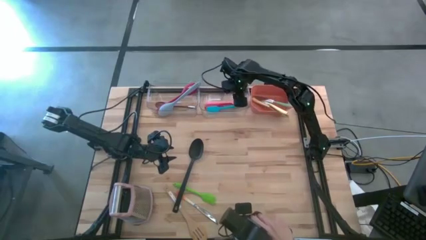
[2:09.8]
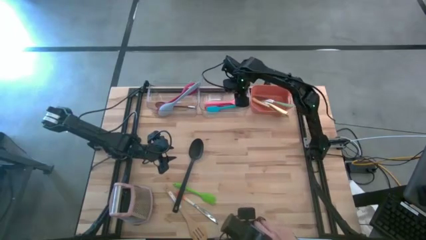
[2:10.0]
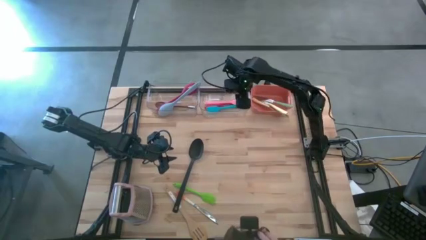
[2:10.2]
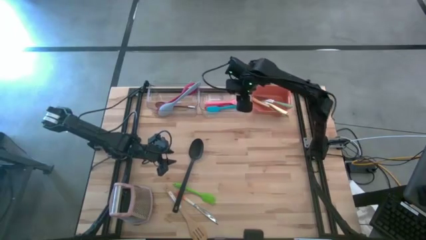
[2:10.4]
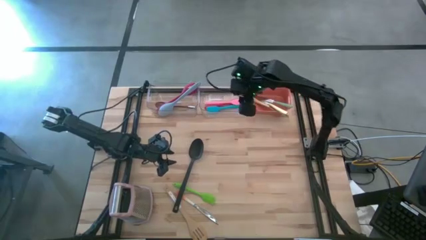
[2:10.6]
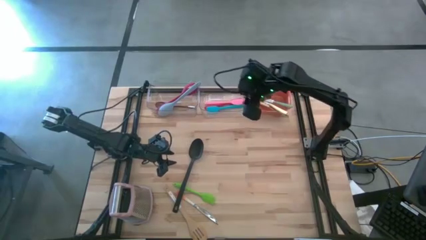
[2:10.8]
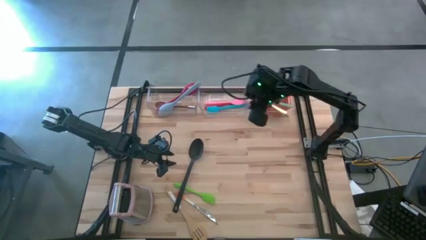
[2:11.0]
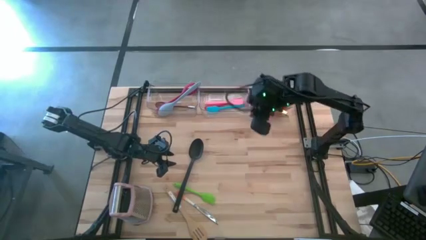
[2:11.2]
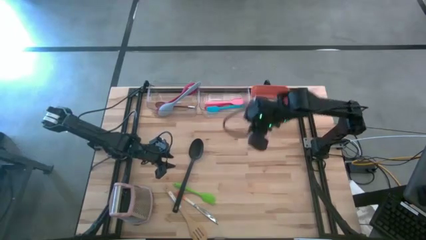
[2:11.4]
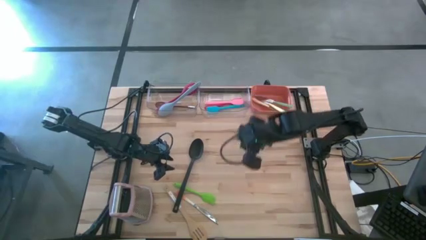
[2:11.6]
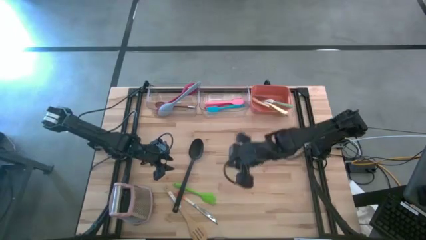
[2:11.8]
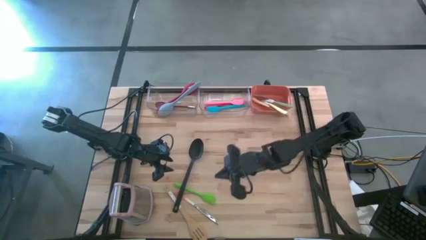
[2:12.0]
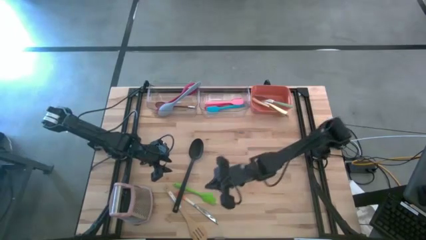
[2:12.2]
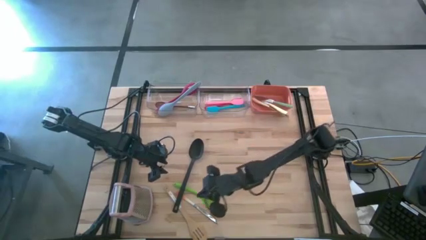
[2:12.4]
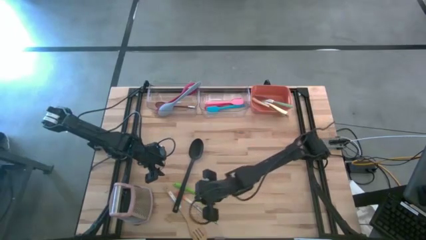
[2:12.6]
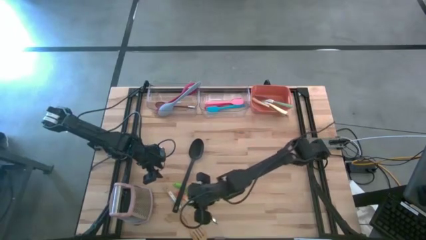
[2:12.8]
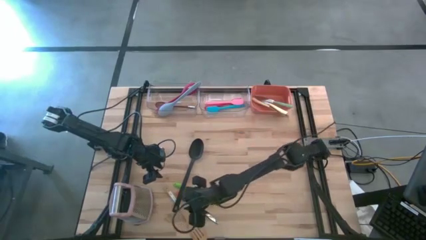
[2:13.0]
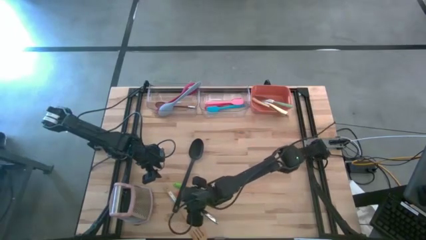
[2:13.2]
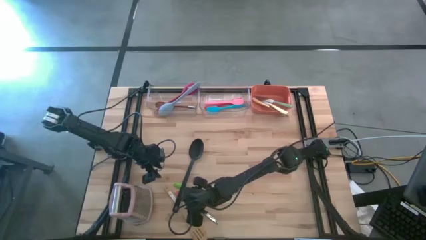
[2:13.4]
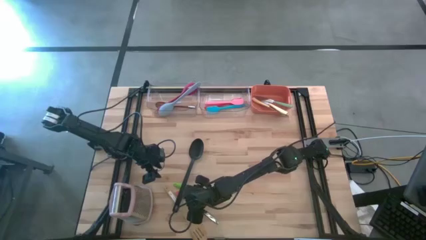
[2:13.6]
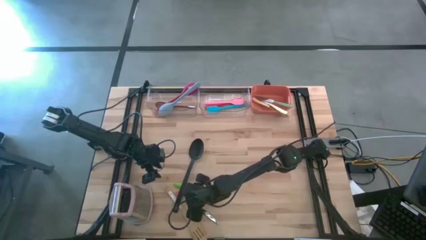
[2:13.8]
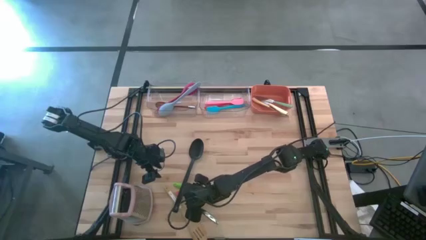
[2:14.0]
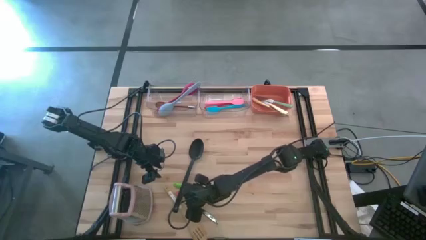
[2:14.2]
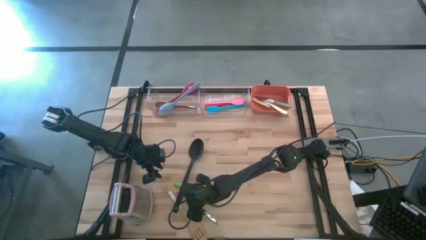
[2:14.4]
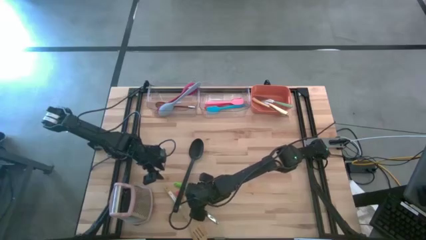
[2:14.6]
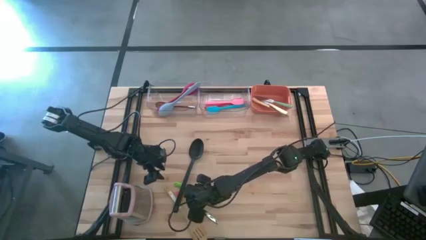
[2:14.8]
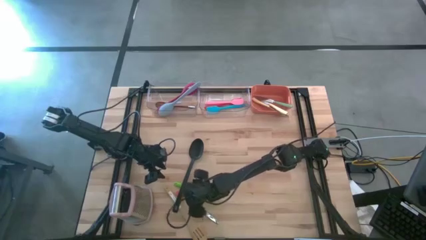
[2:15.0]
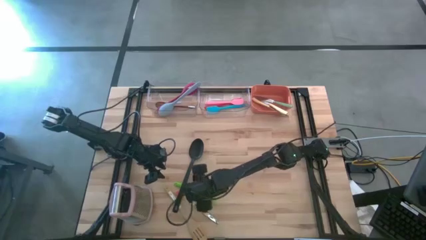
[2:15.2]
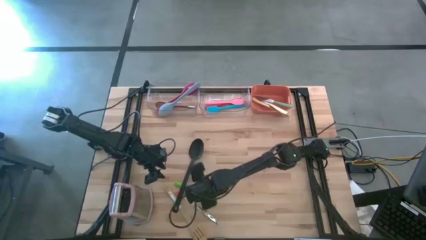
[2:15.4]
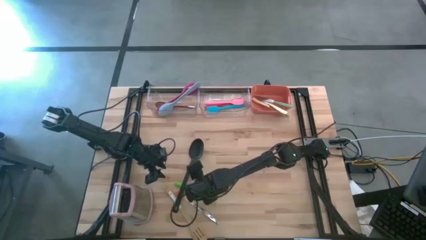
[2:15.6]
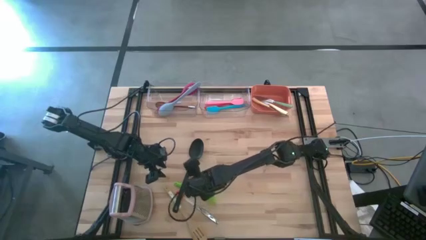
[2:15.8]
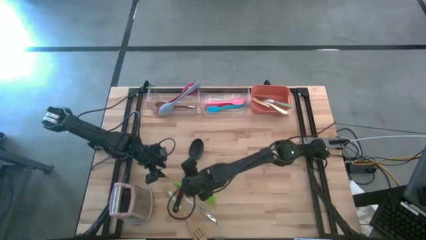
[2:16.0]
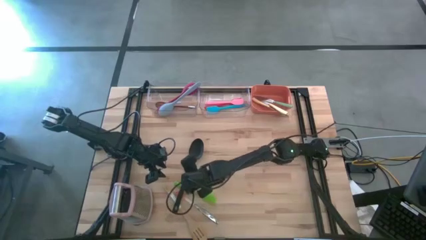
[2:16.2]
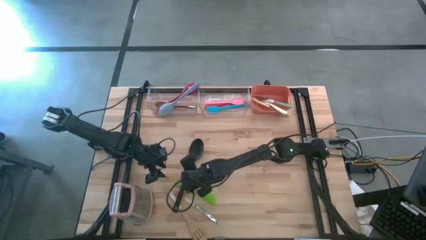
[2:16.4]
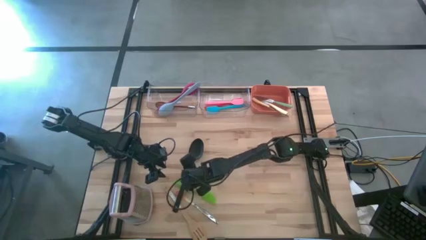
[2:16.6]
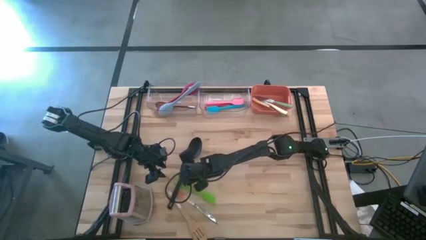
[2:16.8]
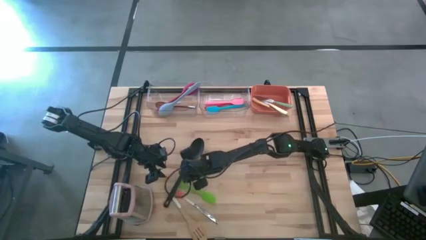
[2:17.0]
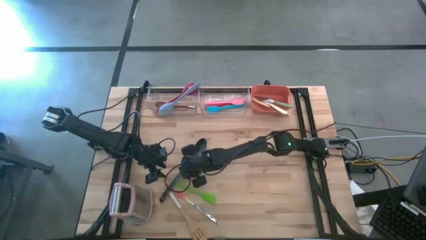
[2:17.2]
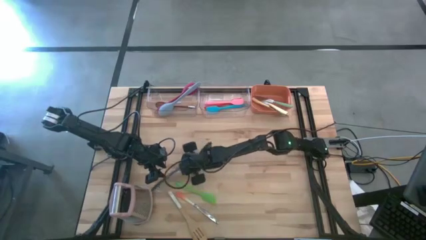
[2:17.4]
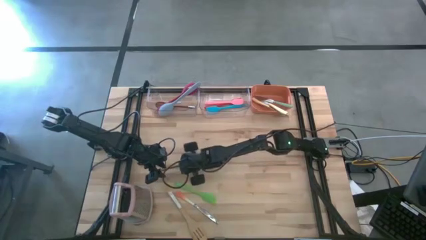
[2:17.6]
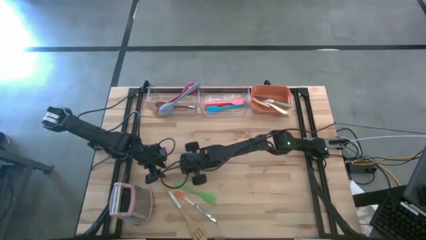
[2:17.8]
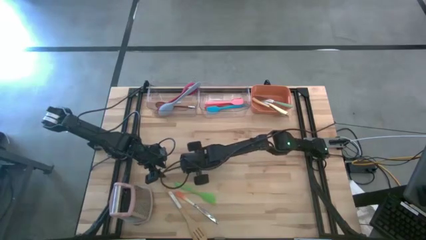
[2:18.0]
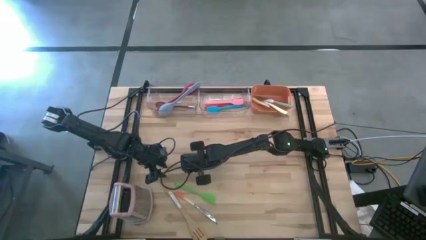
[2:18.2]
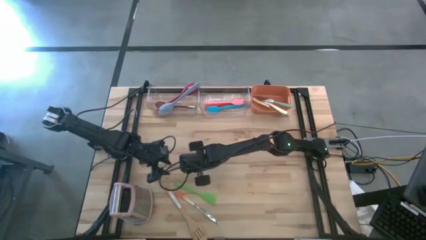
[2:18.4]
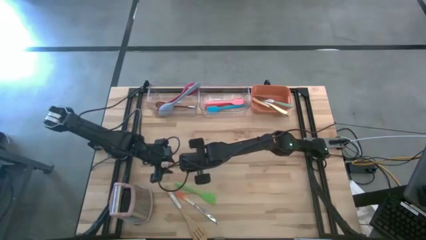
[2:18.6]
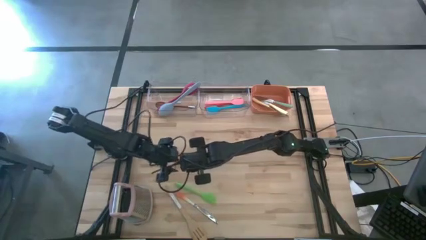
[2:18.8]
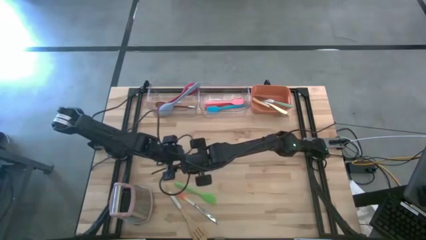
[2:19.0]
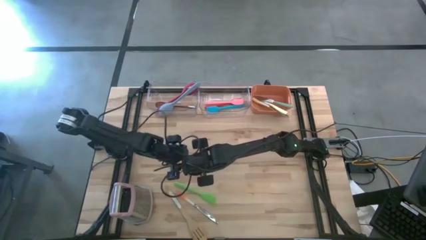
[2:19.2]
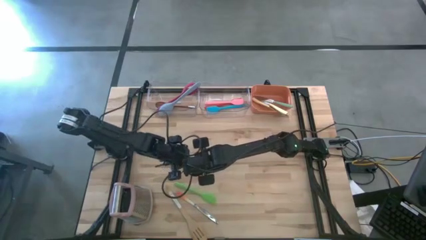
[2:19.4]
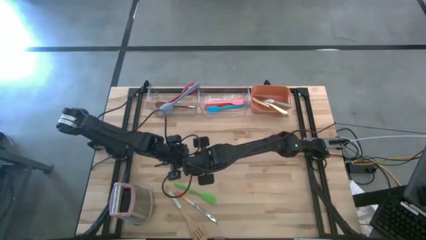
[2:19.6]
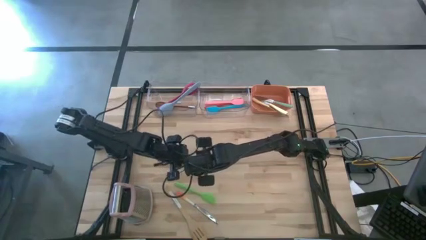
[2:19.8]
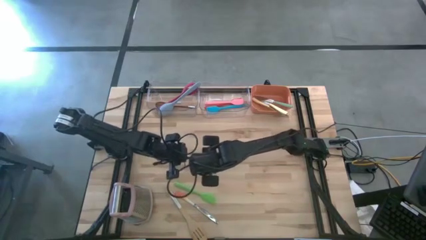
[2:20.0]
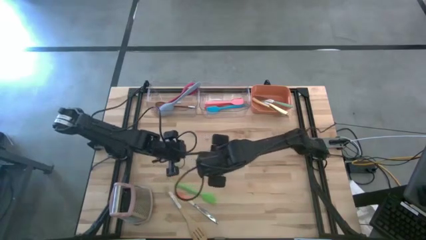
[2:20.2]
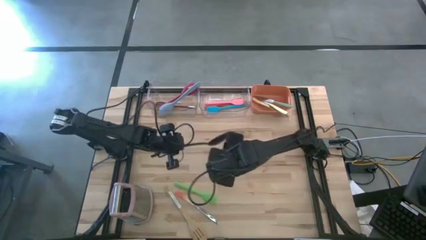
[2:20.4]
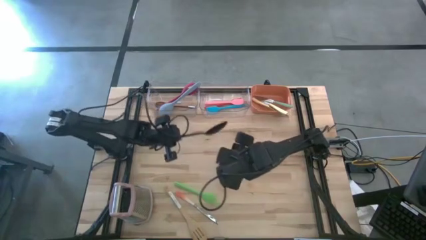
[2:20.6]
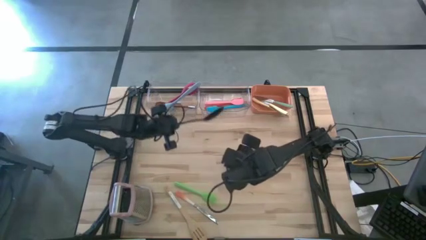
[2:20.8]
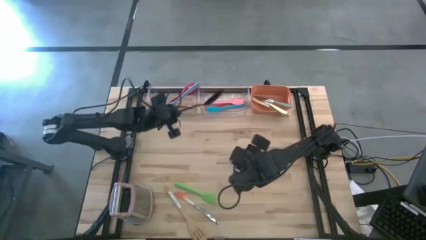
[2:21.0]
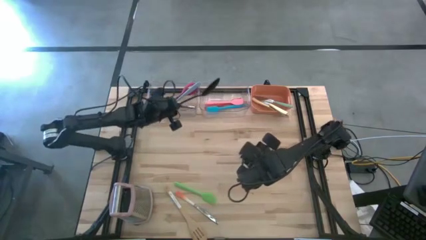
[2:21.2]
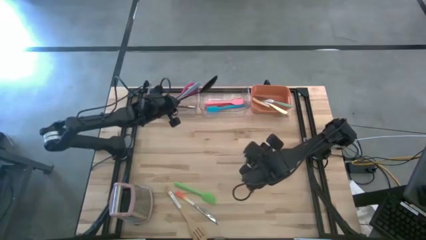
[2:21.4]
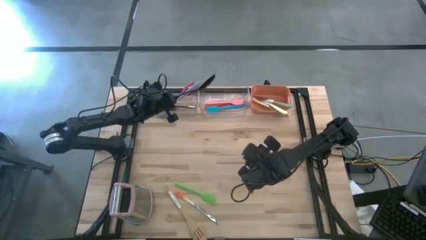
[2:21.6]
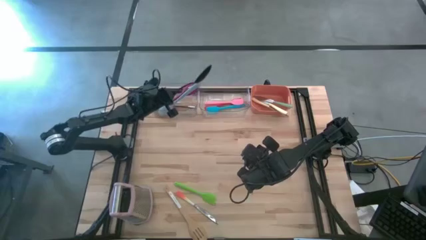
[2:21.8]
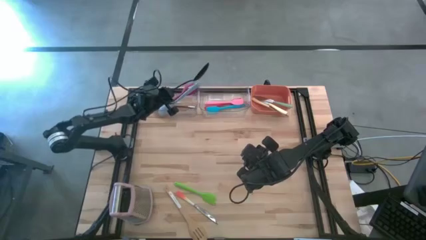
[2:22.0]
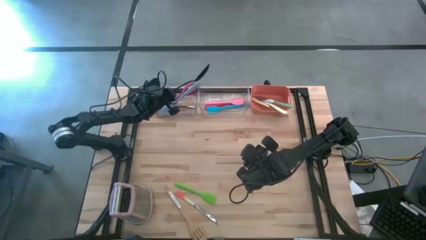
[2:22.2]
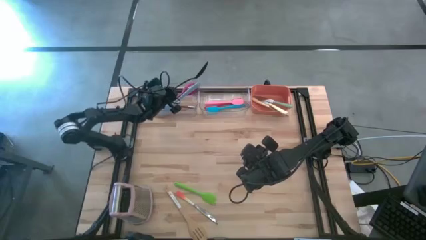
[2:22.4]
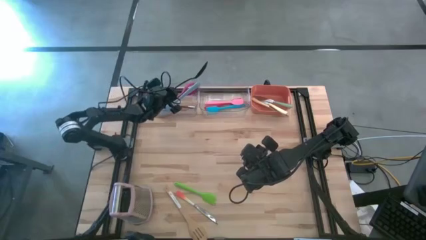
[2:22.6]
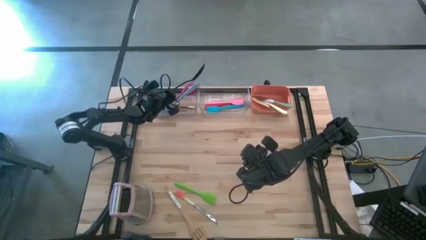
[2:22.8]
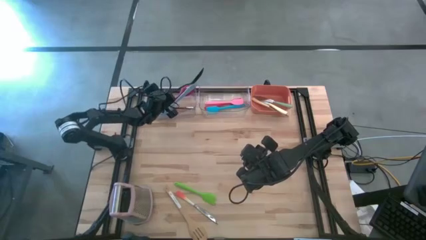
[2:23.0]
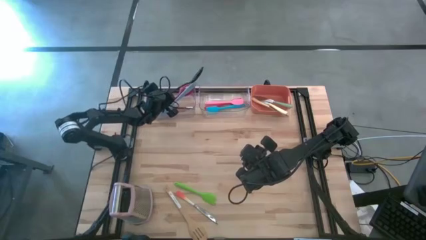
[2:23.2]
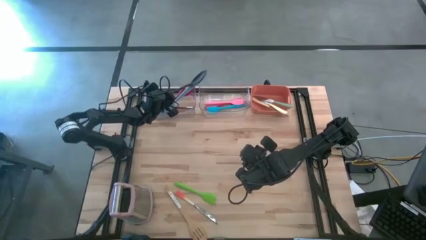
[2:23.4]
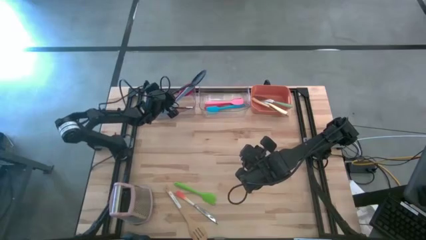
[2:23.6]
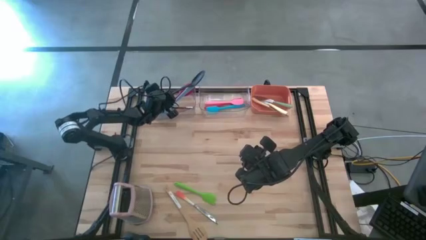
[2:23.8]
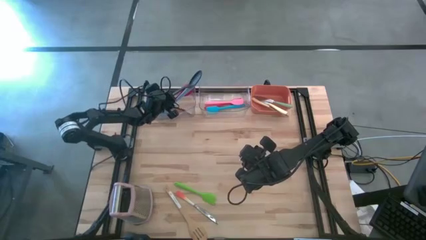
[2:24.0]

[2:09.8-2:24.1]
Task: Pick & Place Kitchen Items
Put the black serving spoon into the left transparent bin
